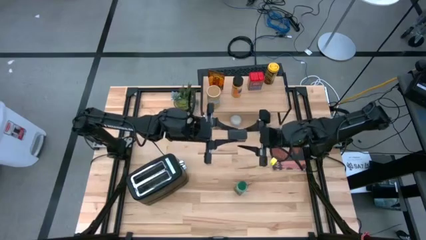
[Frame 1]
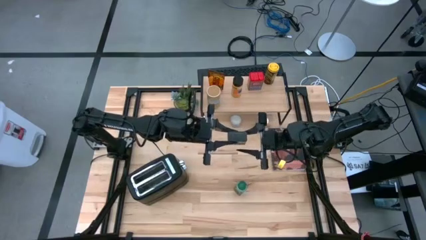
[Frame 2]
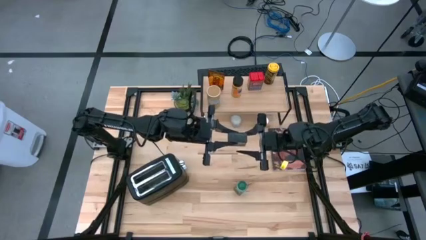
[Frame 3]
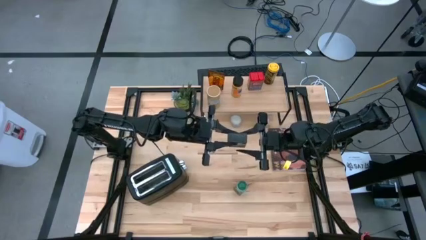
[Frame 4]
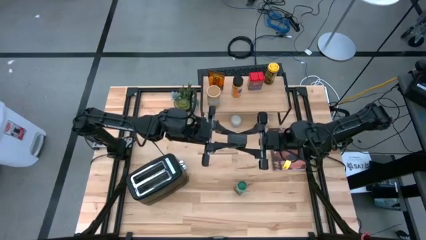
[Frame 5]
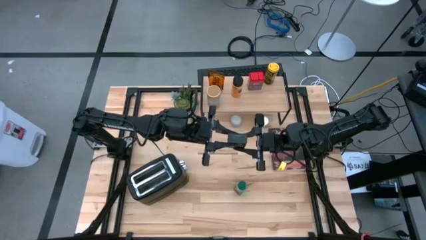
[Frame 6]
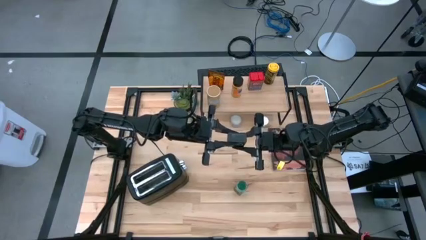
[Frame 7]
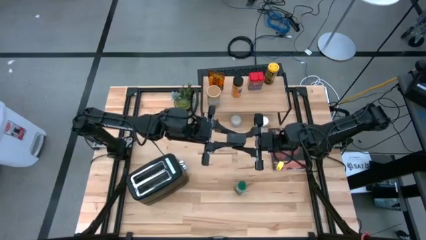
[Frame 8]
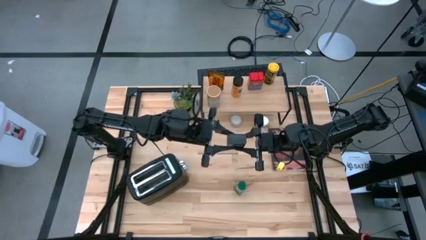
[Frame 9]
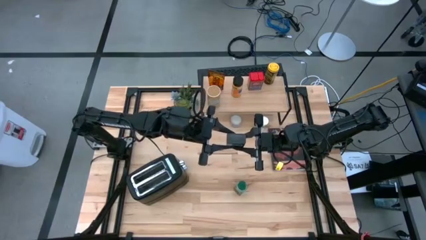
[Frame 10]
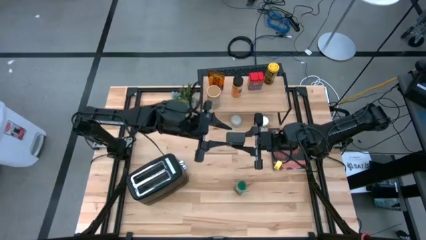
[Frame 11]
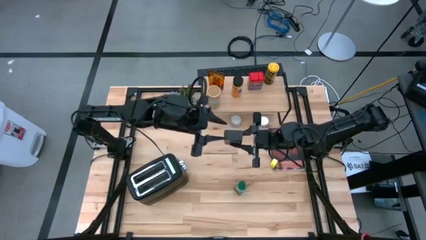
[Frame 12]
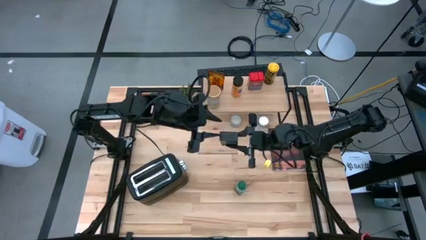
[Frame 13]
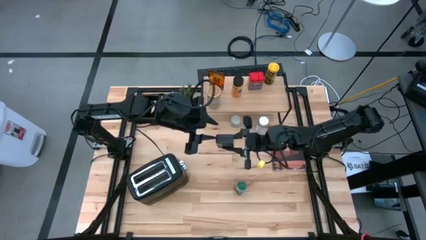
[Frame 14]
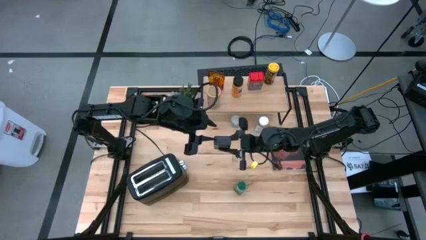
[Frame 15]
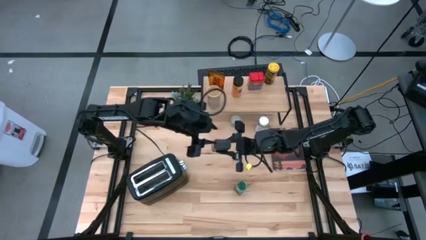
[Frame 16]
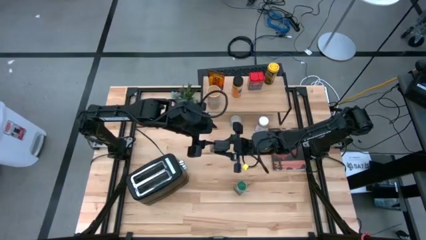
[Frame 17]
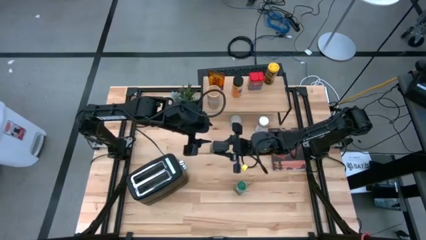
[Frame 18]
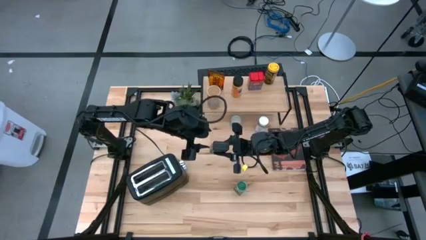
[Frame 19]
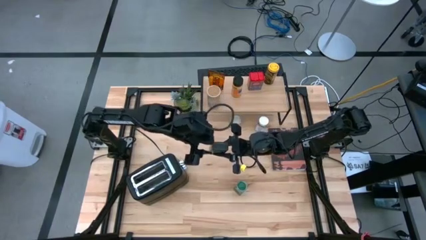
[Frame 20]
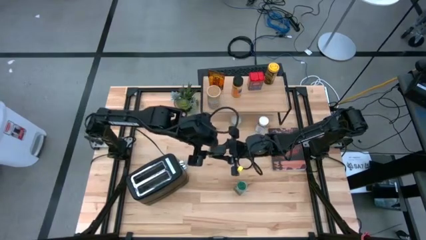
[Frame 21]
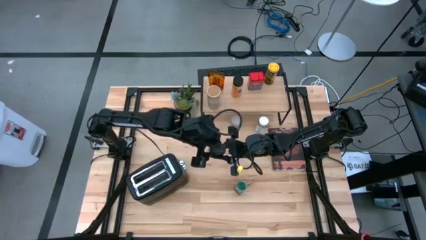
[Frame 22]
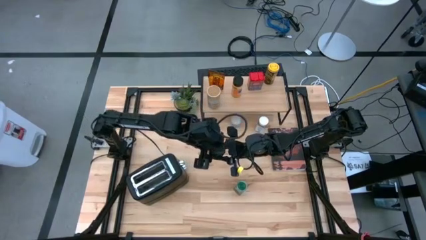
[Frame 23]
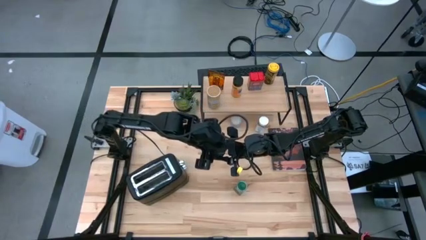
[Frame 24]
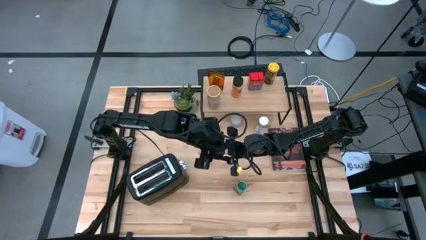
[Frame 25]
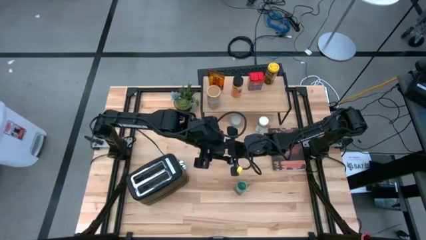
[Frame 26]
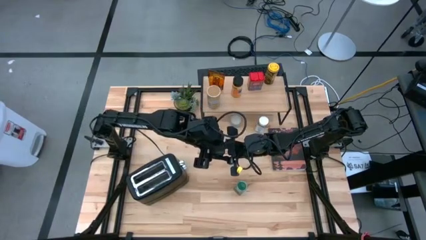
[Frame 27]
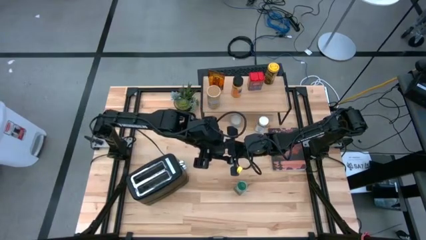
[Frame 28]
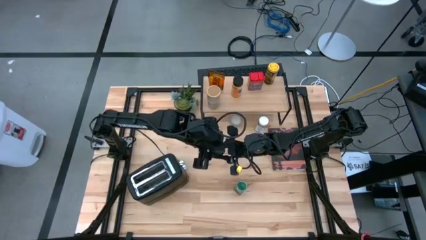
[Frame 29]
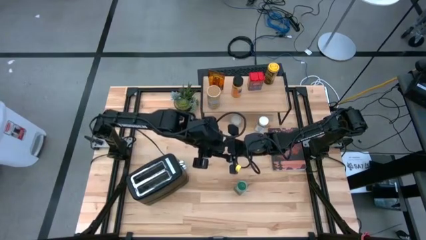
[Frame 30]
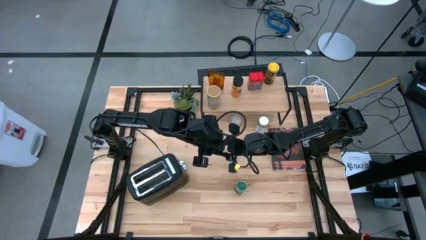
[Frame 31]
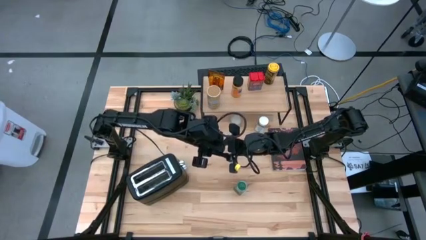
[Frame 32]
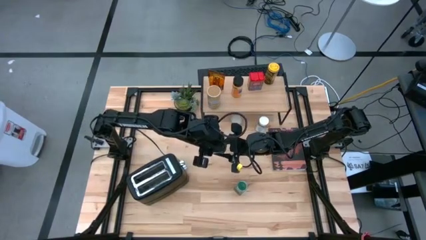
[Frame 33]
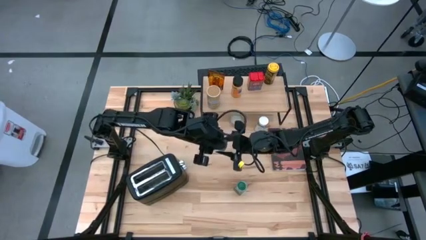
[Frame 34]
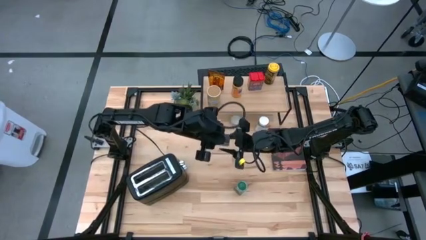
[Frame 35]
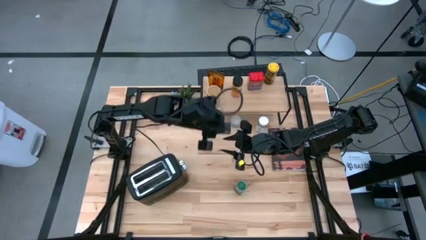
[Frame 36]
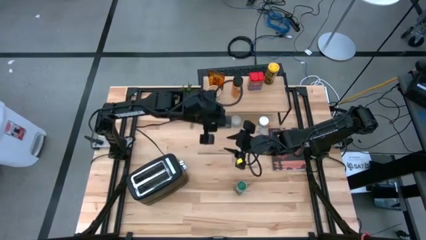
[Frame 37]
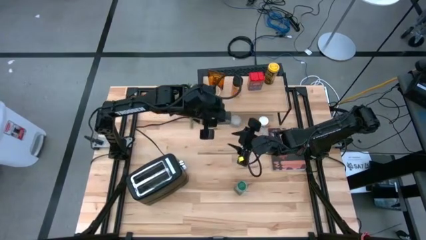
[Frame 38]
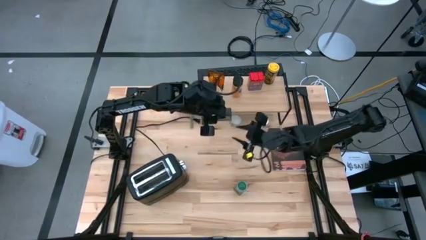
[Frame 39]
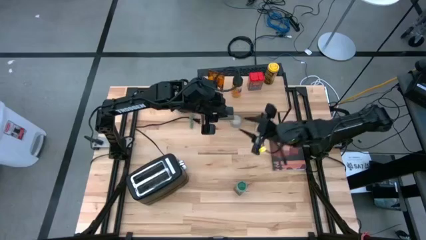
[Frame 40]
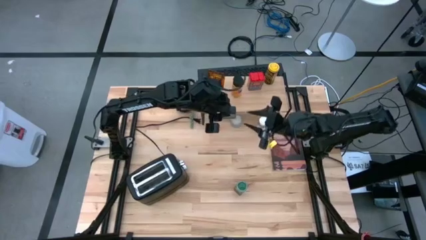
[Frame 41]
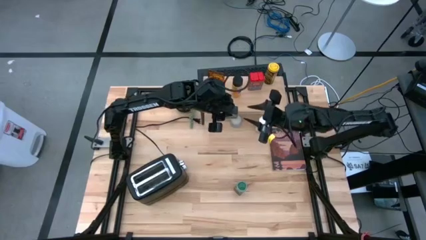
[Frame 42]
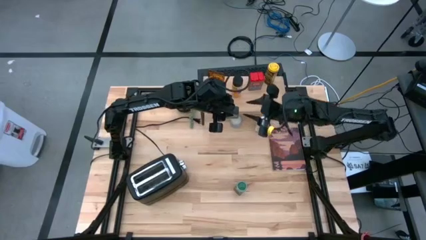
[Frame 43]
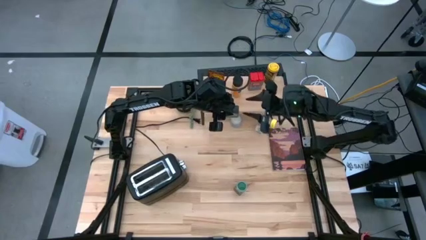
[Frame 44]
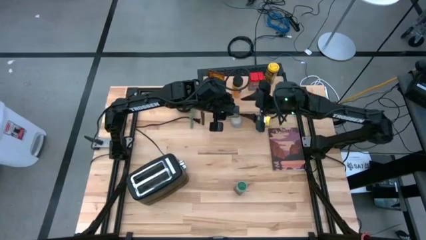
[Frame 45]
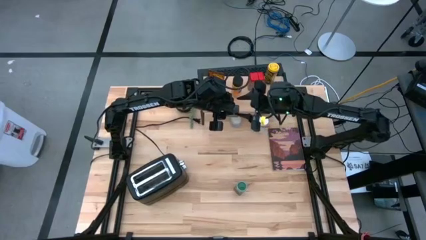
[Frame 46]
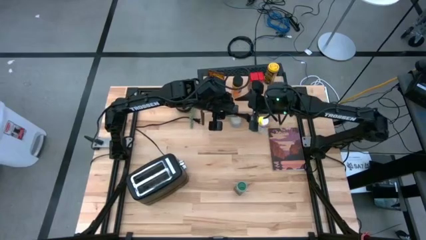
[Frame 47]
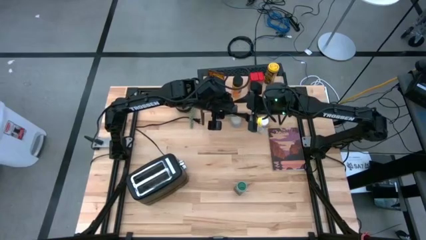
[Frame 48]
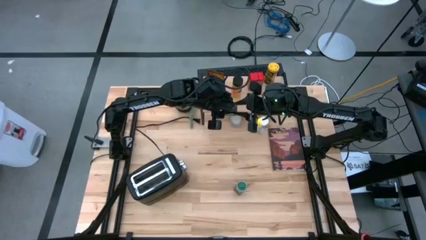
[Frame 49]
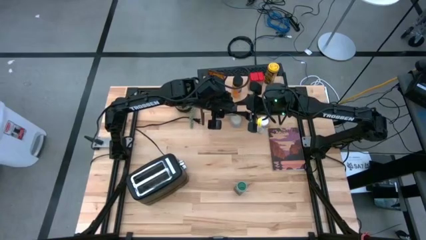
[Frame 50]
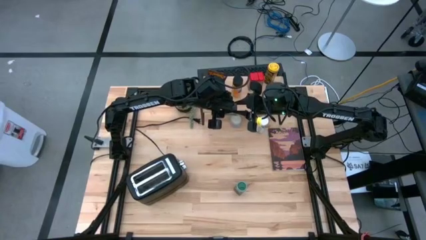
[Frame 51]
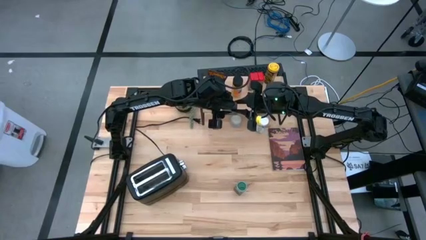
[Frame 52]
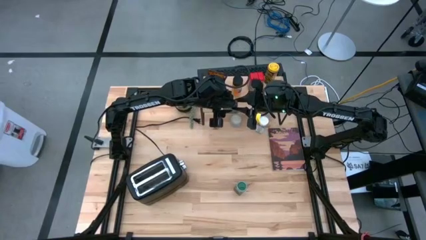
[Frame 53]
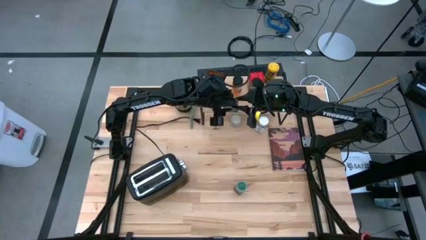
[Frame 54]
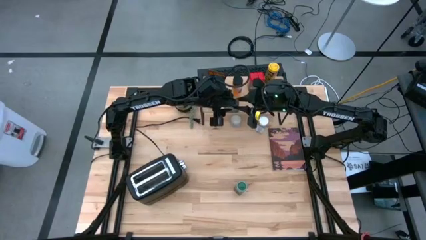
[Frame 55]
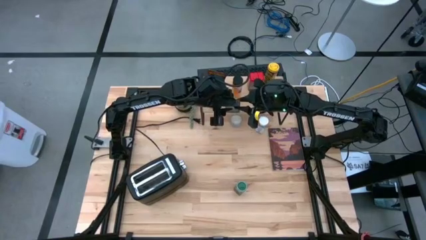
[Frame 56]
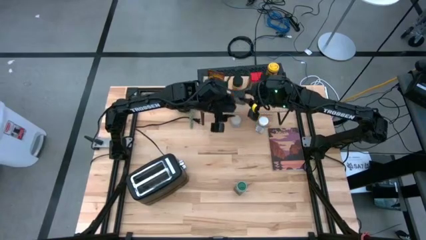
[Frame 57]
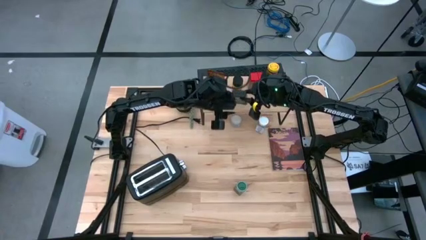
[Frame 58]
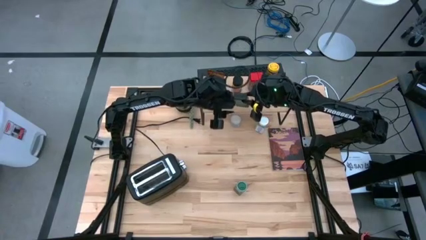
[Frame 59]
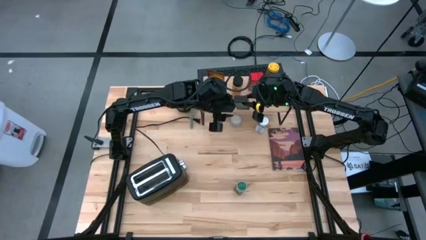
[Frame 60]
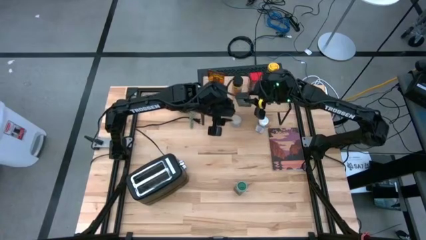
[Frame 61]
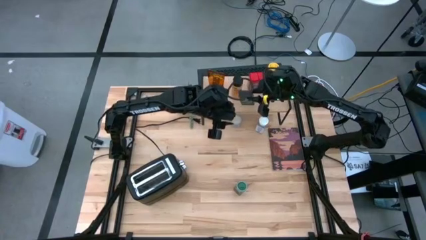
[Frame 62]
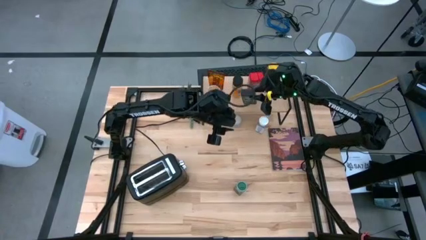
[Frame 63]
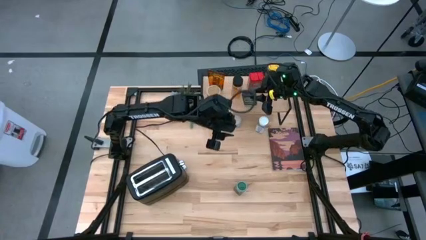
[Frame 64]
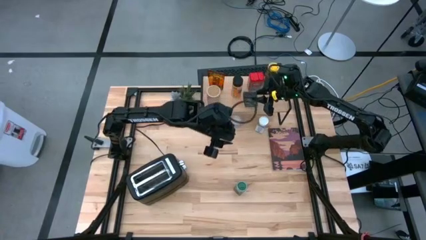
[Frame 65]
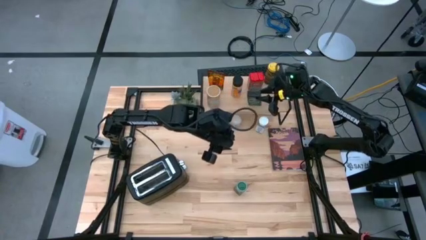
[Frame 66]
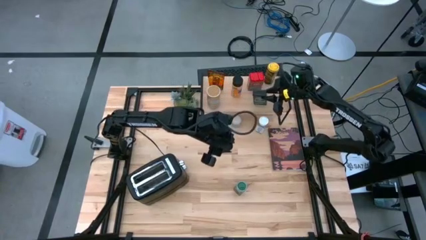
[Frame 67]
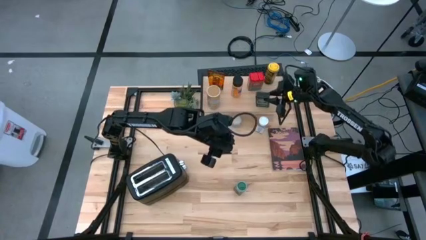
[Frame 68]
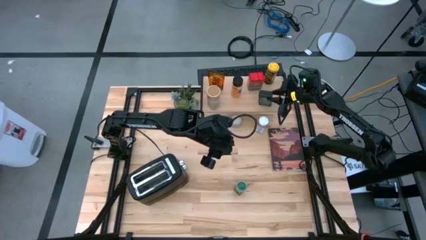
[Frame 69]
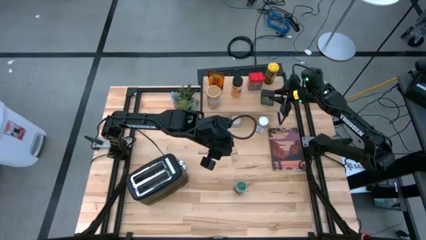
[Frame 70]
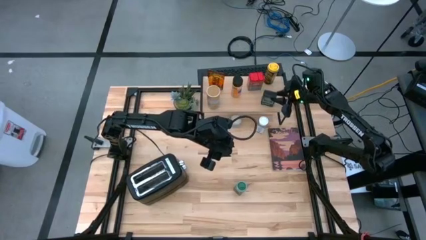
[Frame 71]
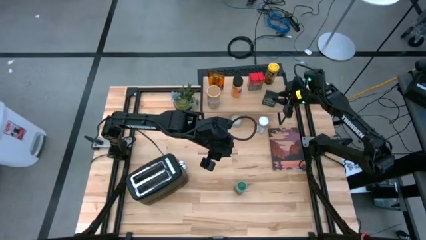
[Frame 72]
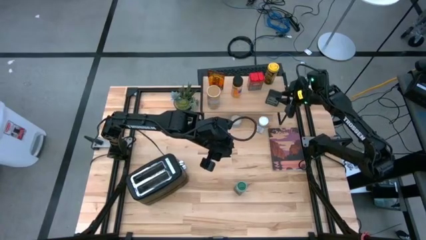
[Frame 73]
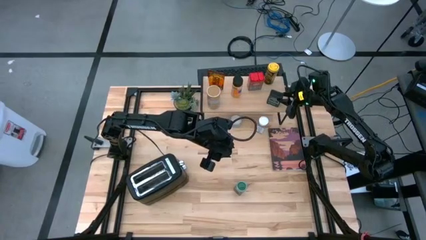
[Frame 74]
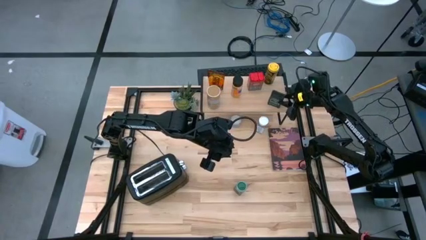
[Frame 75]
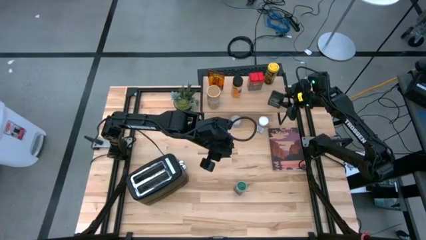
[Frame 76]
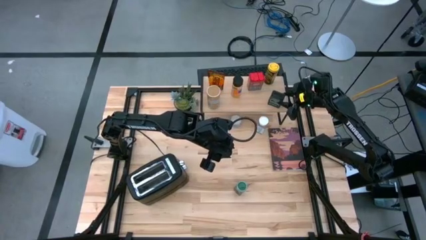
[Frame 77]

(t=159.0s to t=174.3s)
Task: Shelf spices
Put the black seasoning can on the shelf

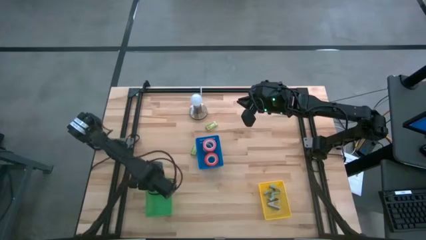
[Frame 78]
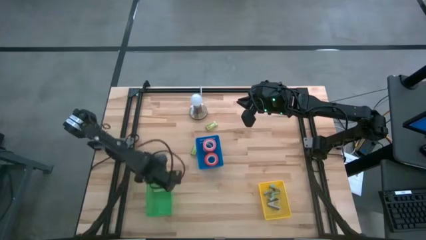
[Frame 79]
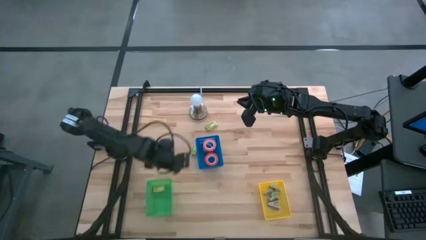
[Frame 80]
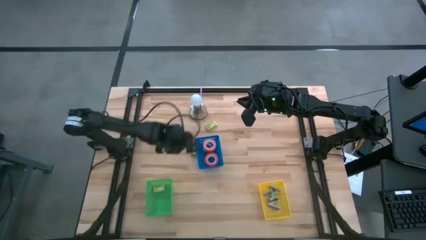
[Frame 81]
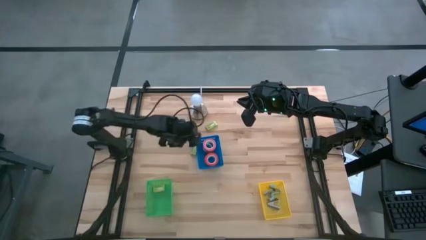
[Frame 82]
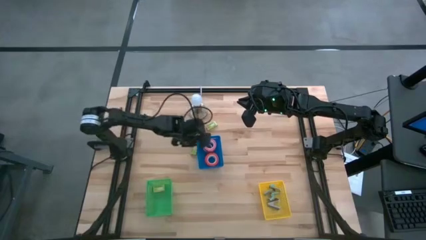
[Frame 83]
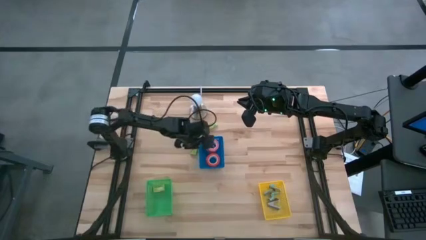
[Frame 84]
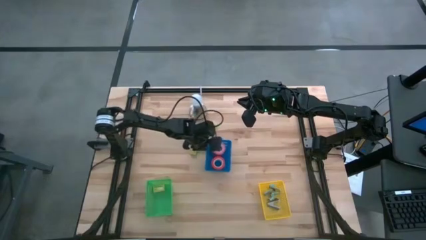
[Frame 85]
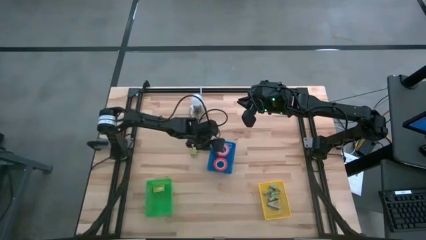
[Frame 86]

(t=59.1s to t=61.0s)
Task: Pick and place Stapler, Stapler remover, tape
Adjust the blue bin on the table
